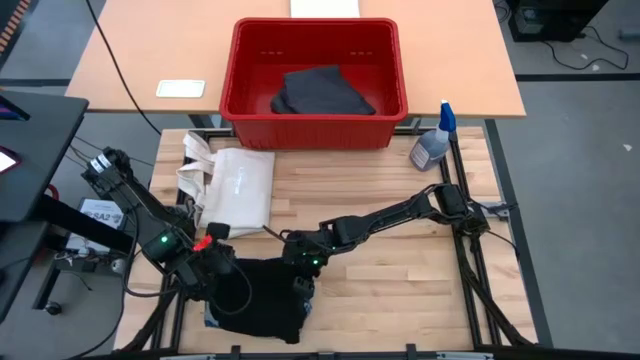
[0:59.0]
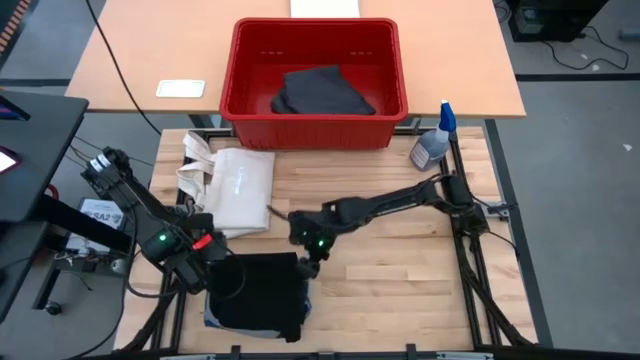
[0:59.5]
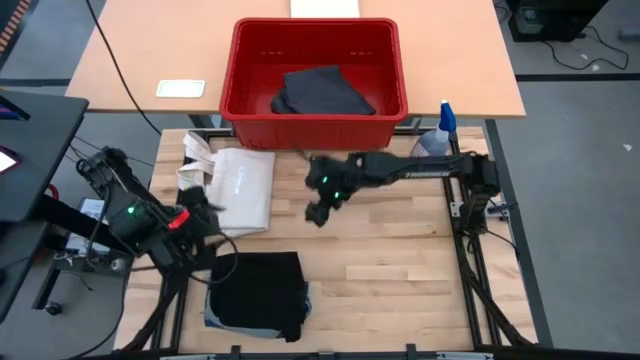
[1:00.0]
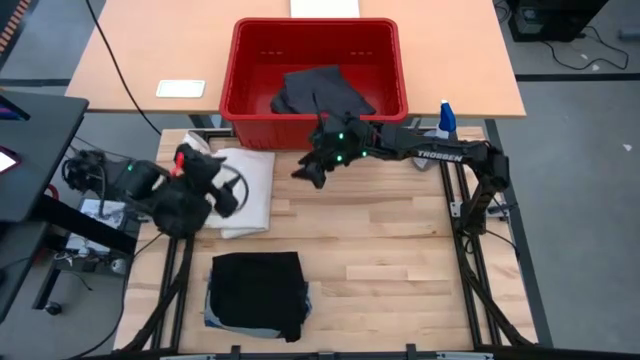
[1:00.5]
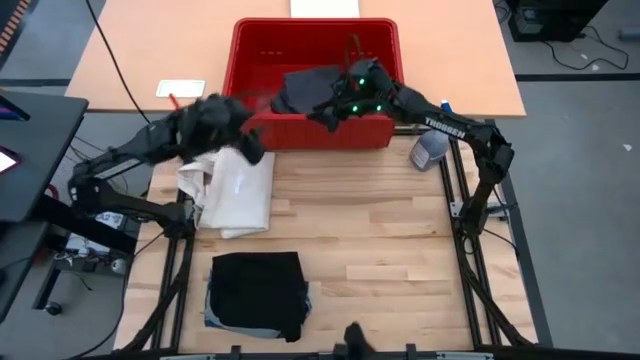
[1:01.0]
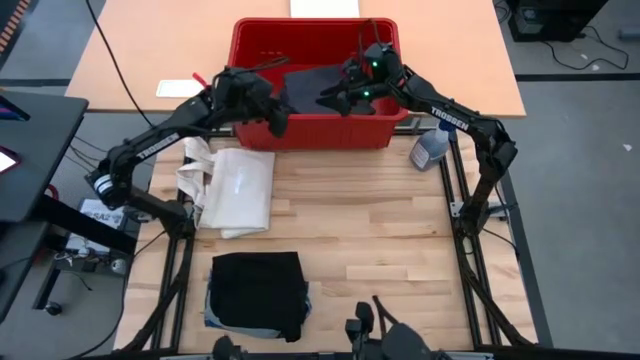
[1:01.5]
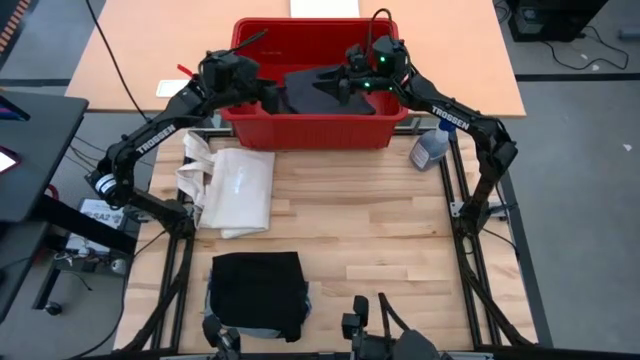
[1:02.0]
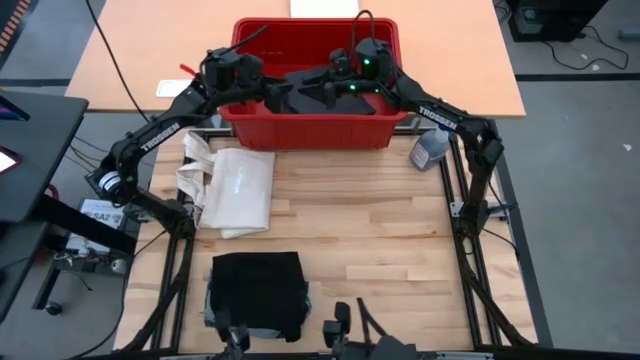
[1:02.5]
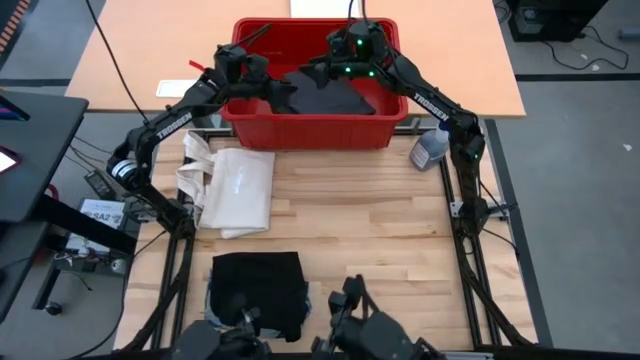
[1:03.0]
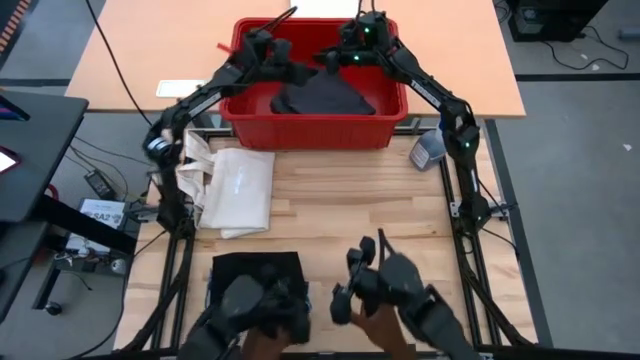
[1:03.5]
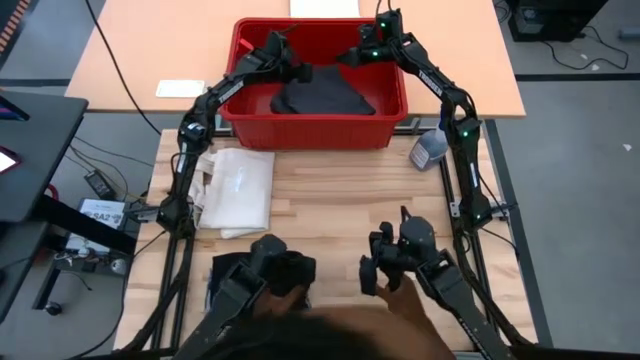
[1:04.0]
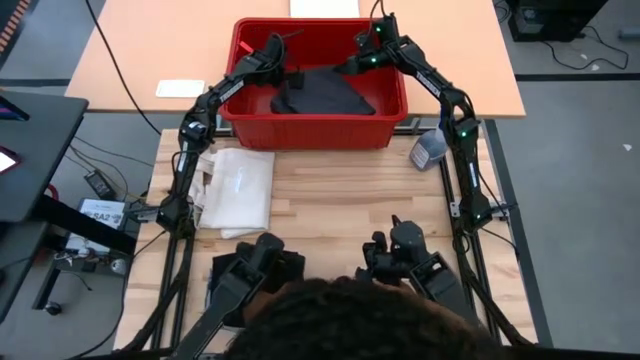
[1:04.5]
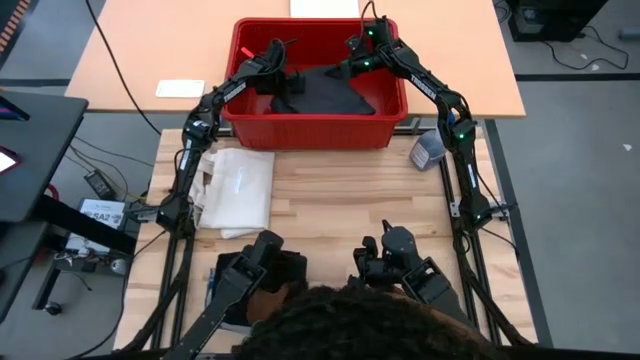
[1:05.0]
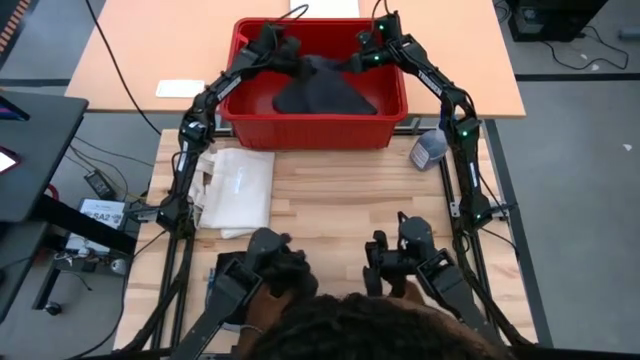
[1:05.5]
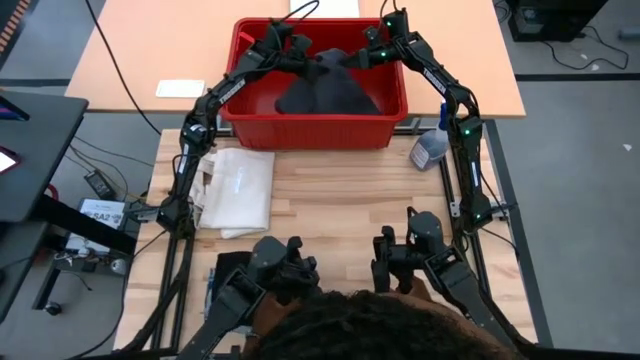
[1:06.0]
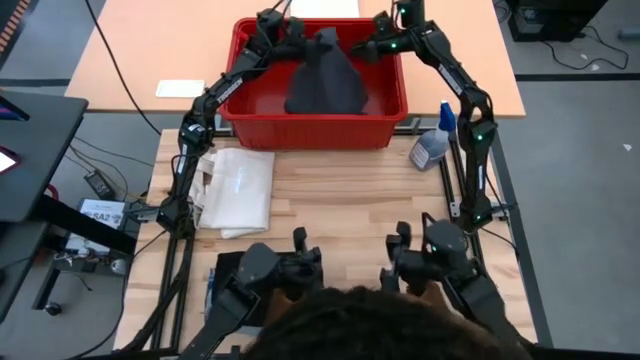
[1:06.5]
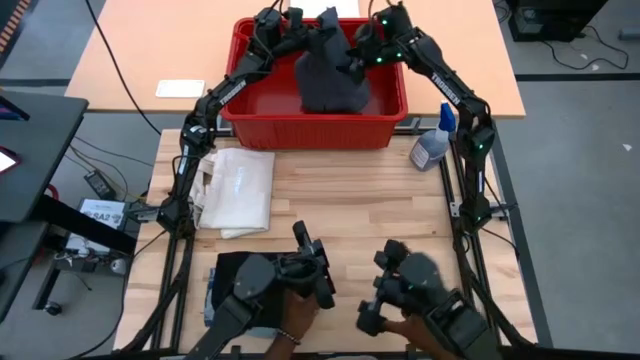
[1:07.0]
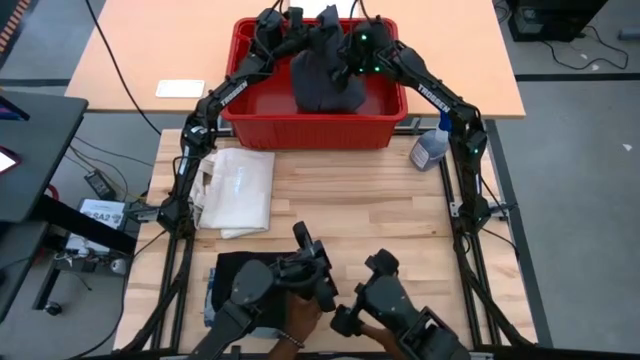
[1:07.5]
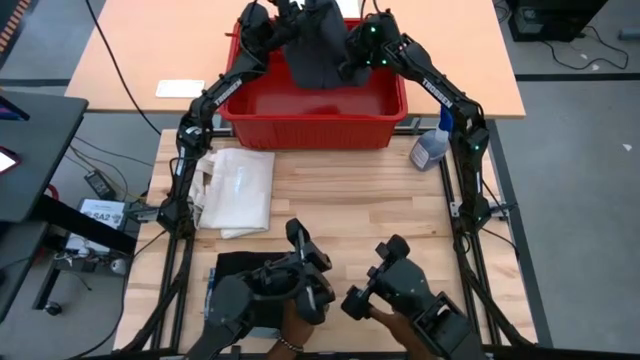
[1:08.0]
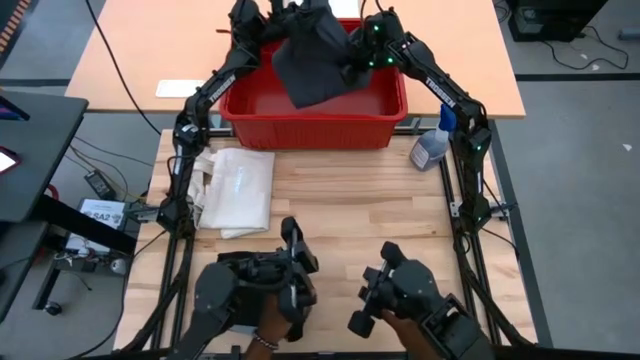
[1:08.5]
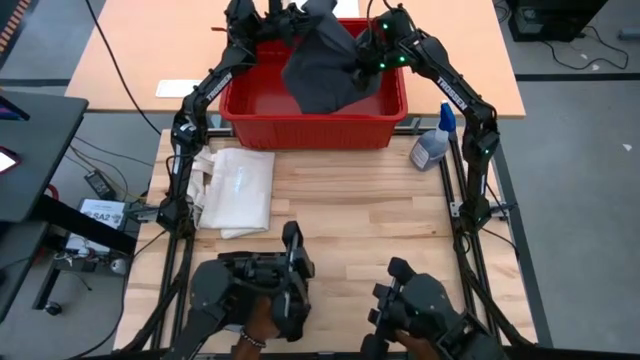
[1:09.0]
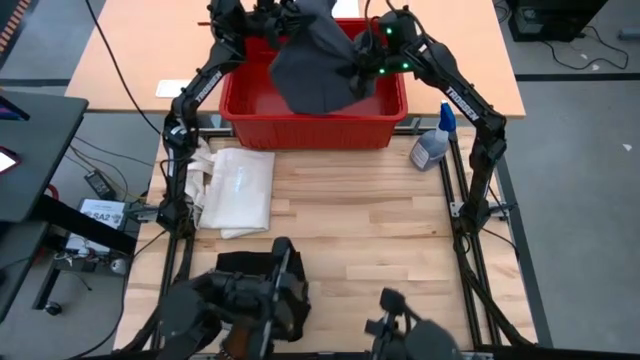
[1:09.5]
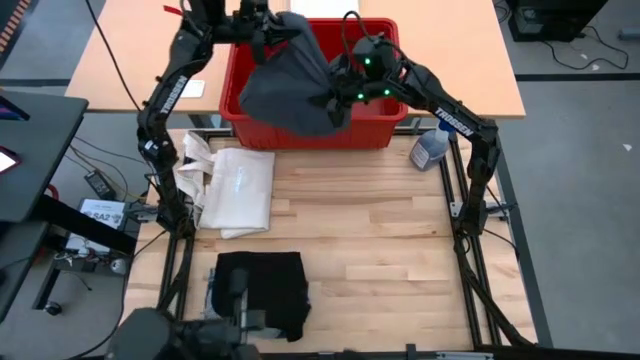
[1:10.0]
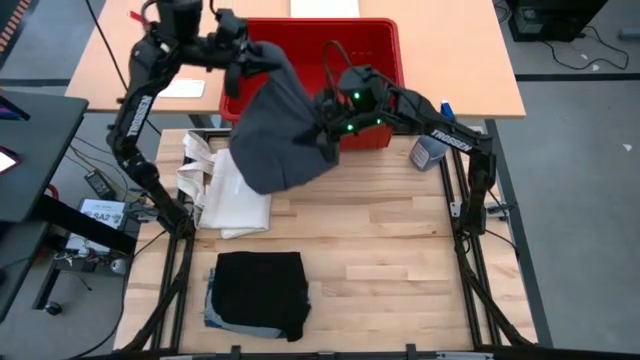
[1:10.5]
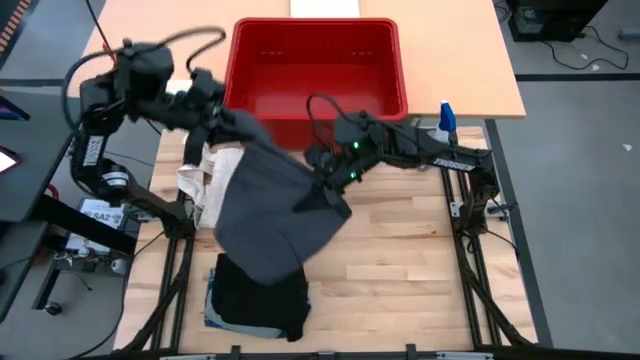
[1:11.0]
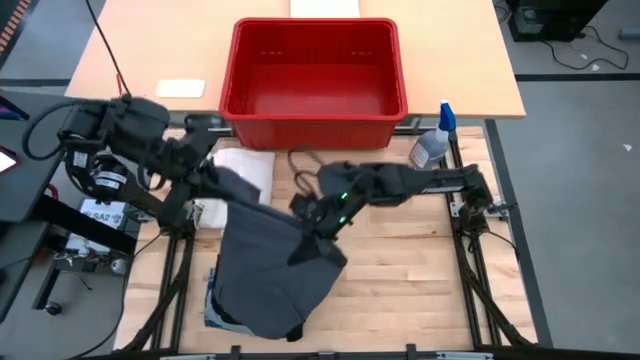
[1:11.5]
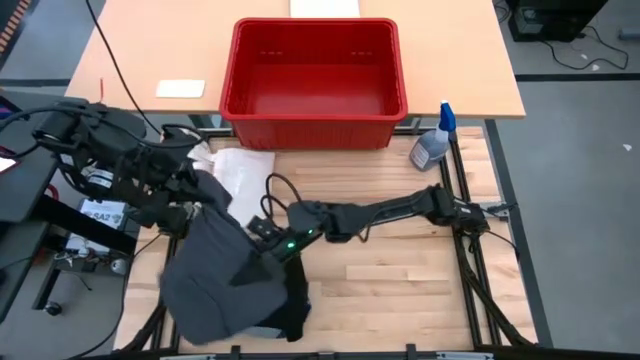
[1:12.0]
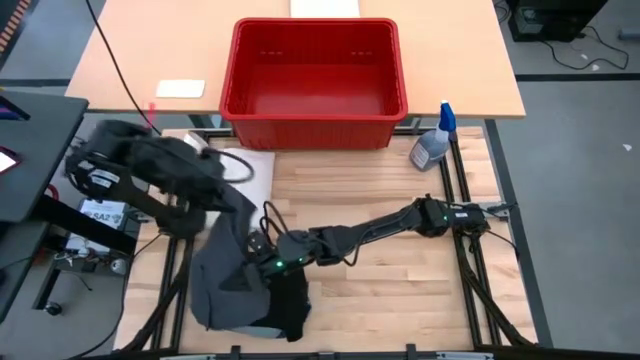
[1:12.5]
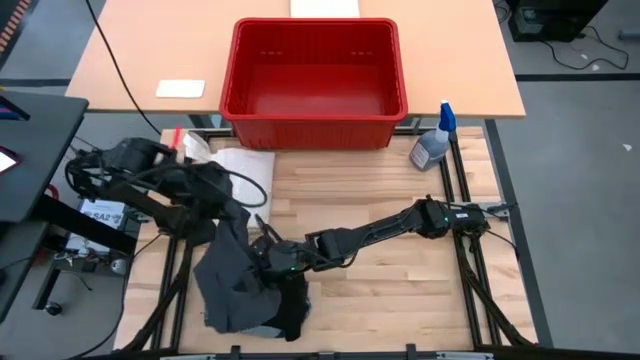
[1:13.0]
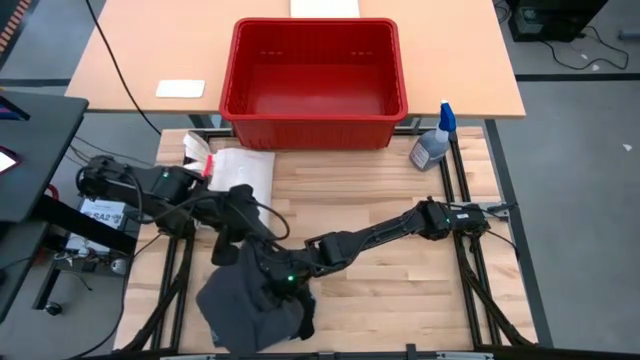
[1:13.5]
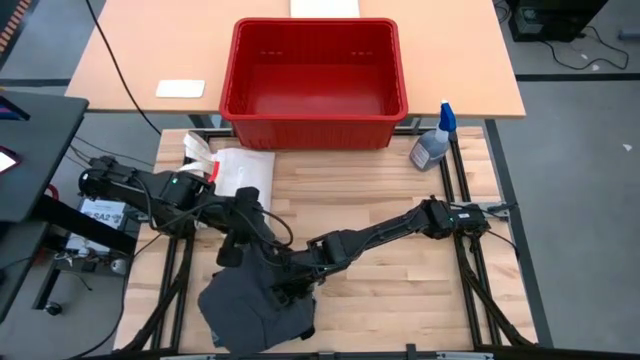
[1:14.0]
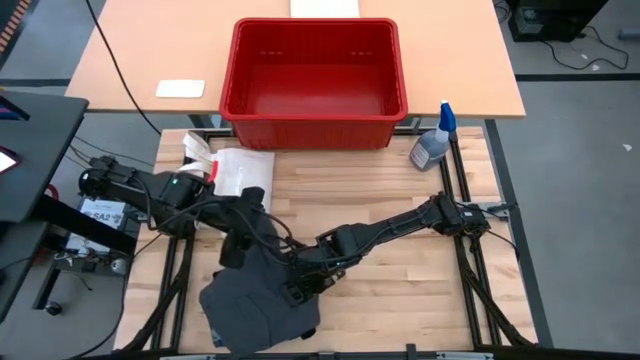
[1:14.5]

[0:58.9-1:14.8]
Task: Sort clothes
Remove the gray pants from the red bin

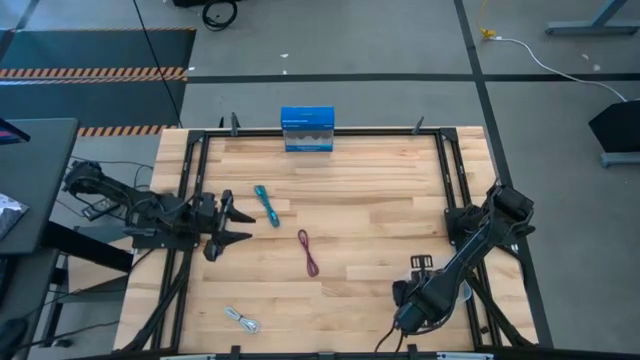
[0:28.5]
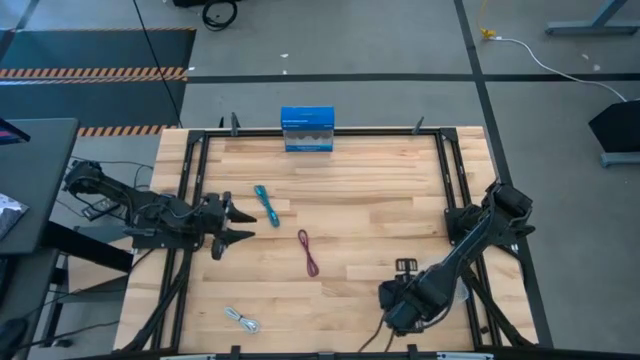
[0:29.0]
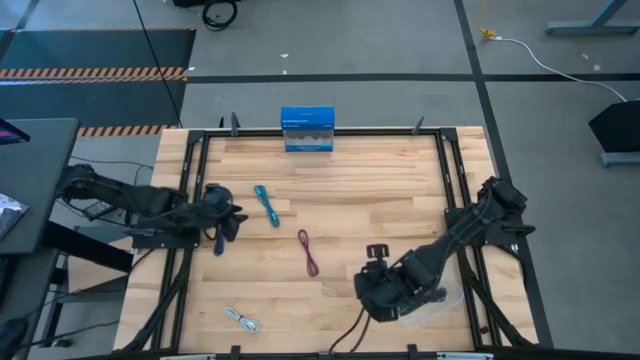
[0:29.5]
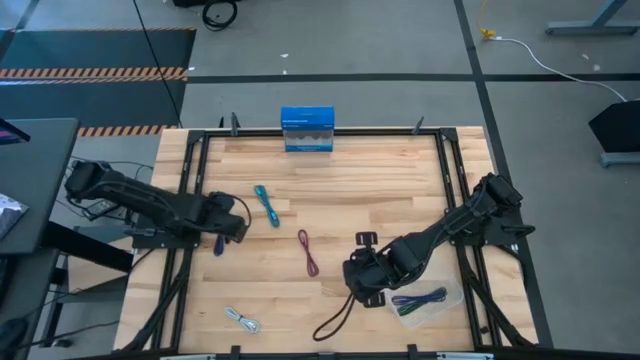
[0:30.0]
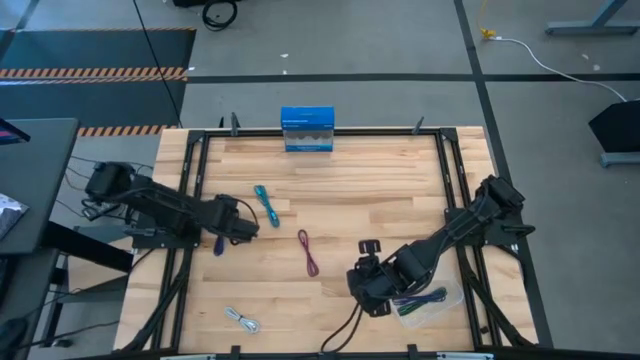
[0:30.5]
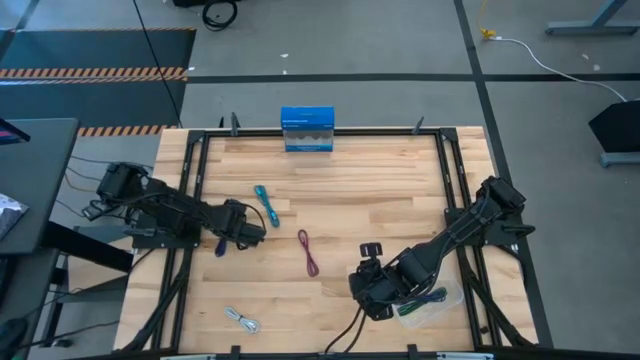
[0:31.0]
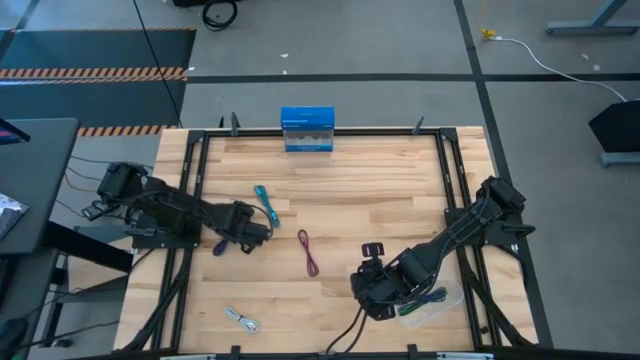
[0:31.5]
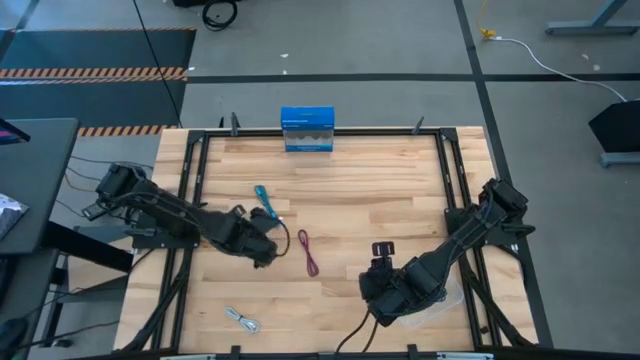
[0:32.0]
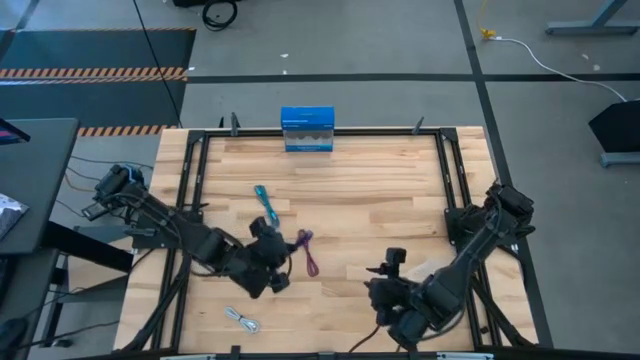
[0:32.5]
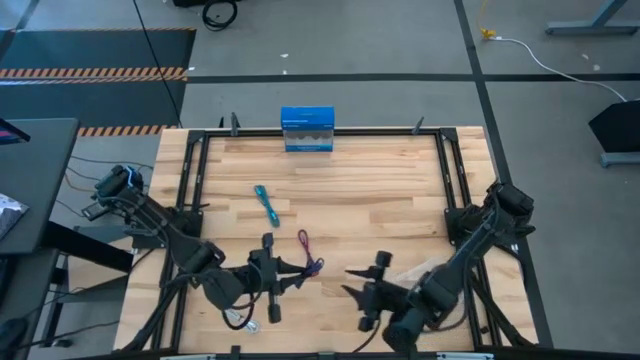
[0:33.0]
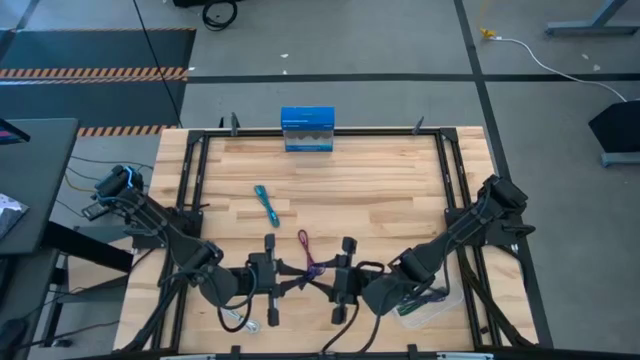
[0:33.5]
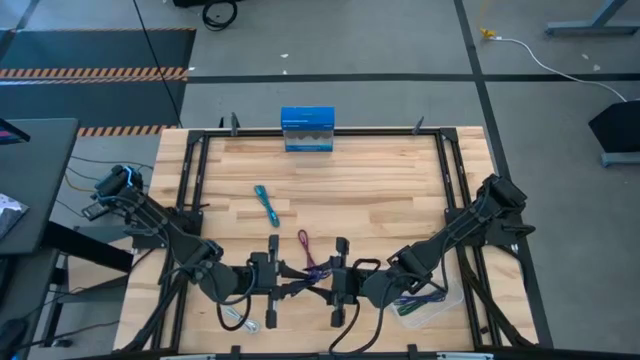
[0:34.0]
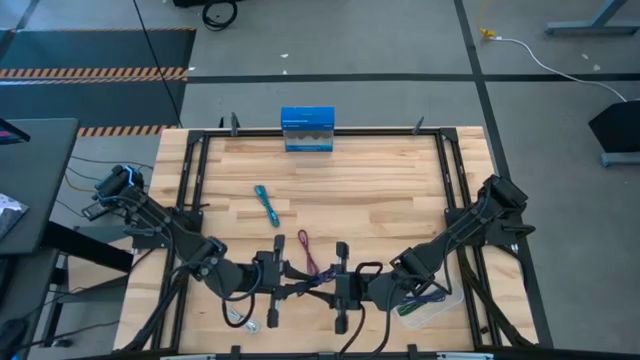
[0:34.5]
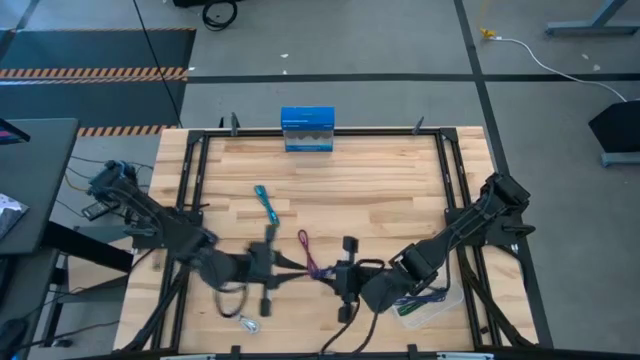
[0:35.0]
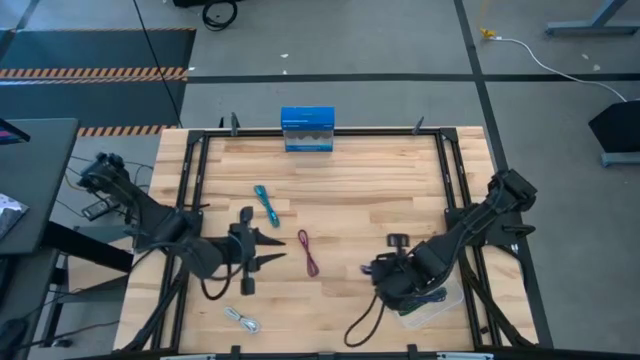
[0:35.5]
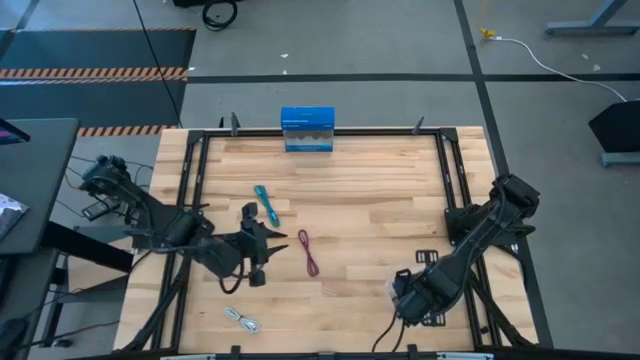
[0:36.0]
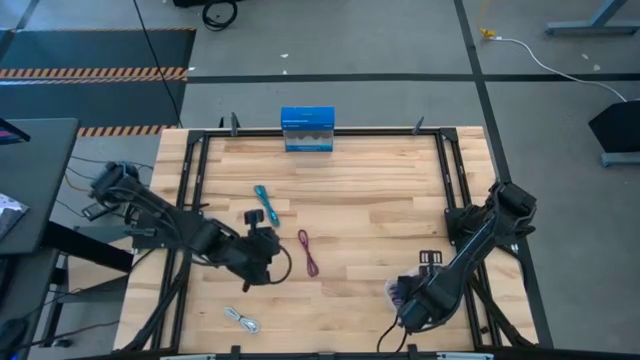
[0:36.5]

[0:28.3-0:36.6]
Task: Pick and place USB-C Cables
Put the dark blue charger cable into the transparent bin
